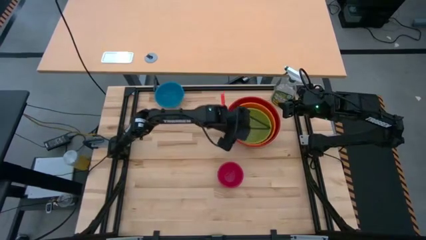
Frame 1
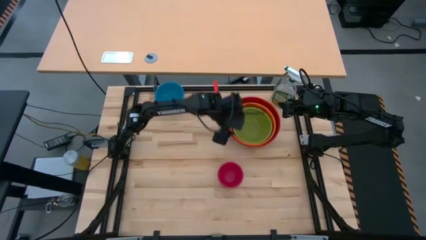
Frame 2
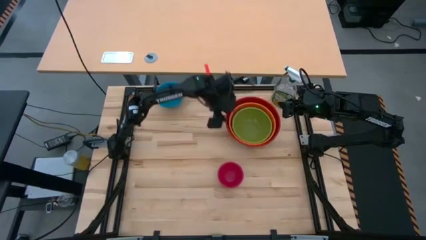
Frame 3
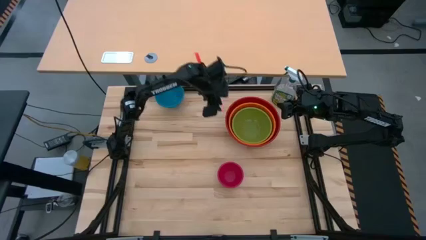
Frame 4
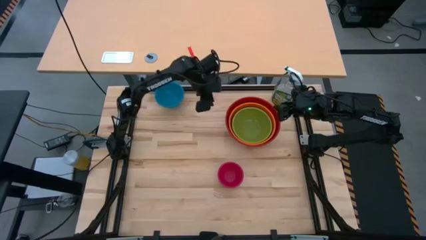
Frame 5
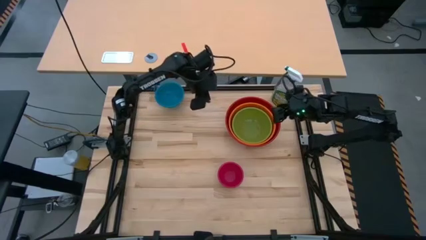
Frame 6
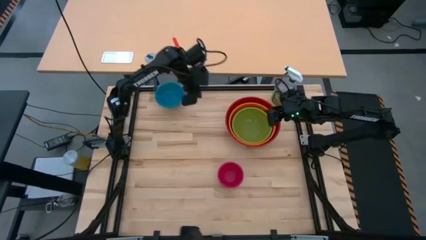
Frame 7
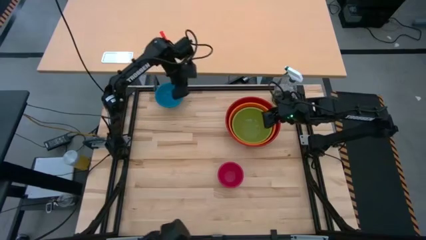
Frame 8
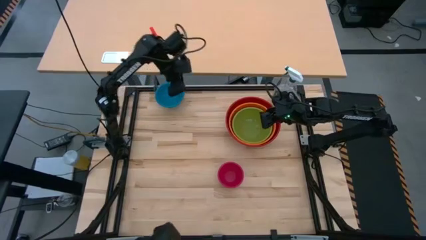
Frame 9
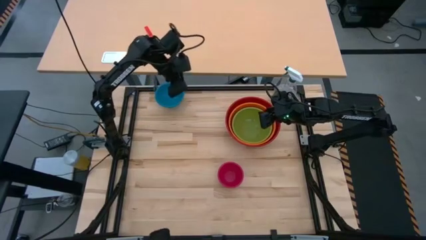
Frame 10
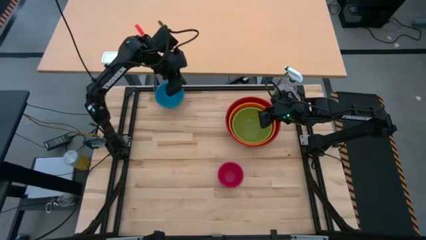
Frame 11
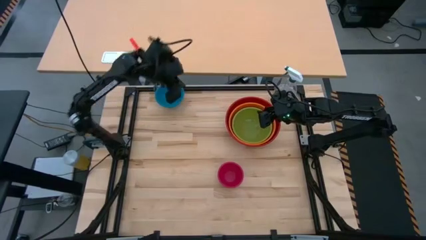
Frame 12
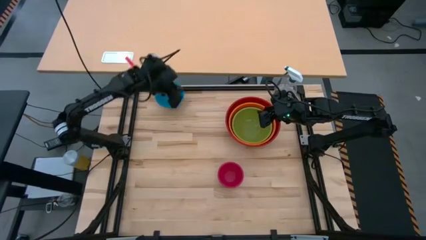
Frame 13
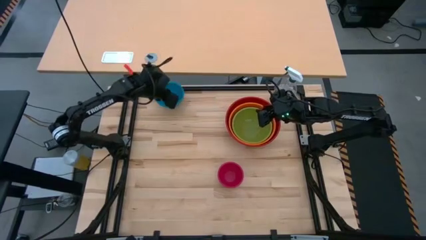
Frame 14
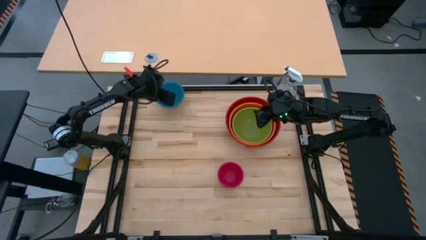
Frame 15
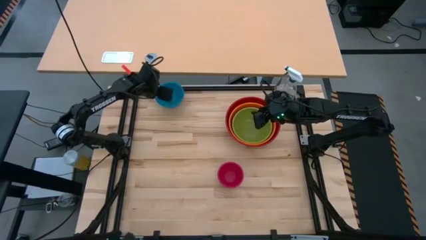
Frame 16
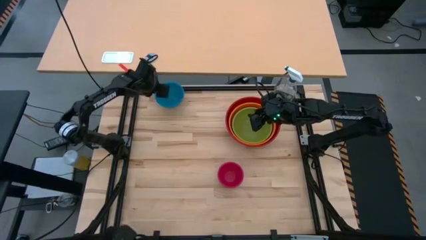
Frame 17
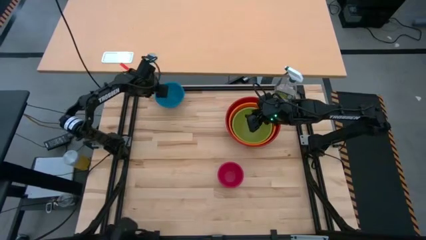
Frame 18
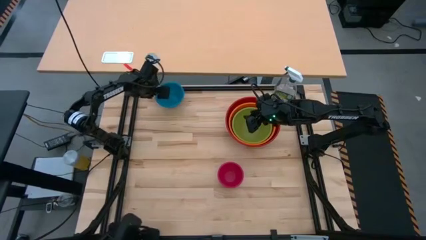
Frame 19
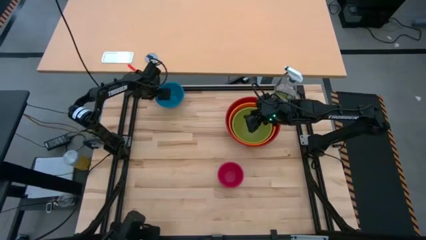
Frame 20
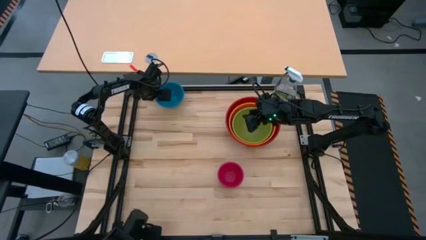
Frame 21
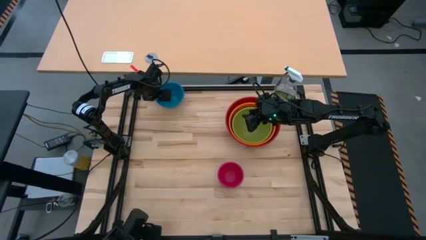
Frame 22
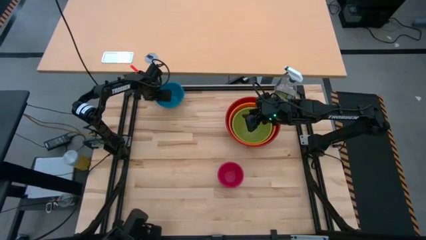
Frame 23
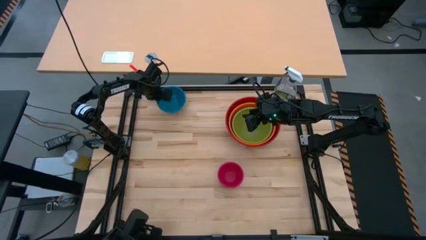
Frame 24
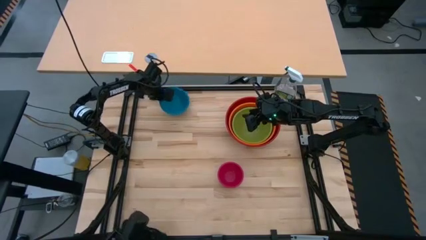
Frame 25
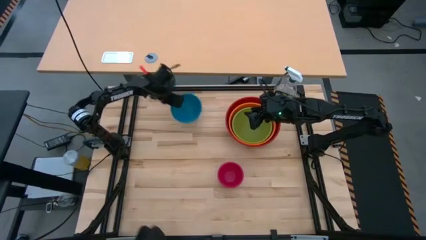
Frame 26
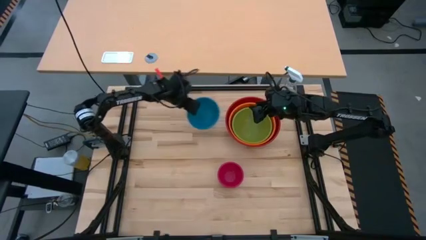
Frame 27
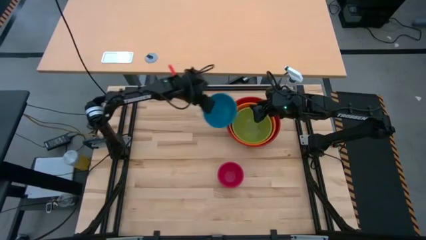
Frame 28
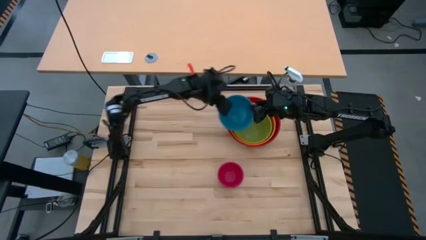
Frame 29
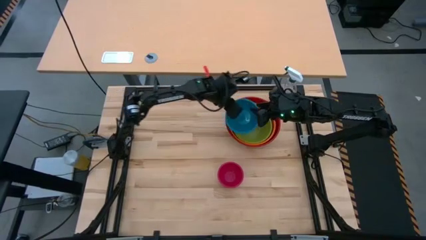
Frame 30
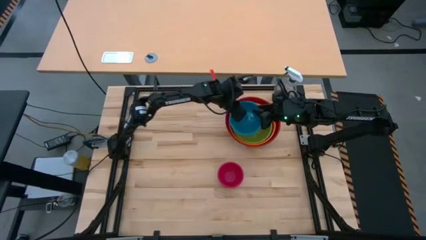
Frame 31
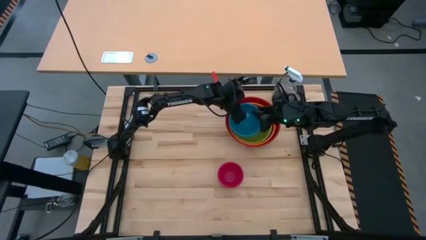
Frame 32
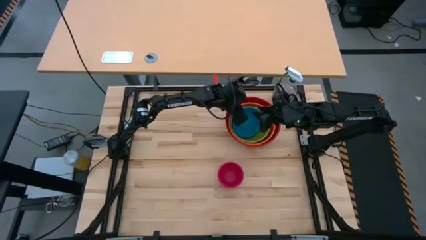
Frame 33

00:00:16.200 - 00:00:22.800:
Stack the blue bowl on top of the green bowl

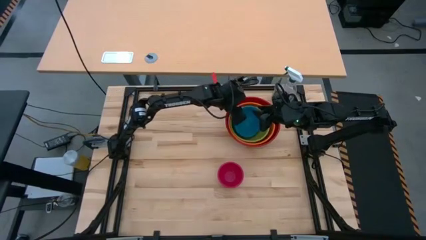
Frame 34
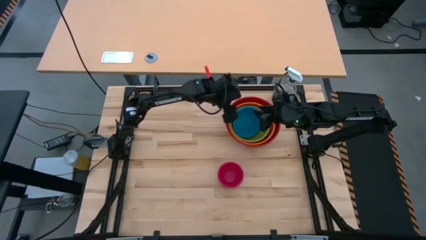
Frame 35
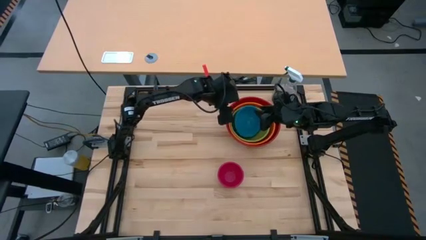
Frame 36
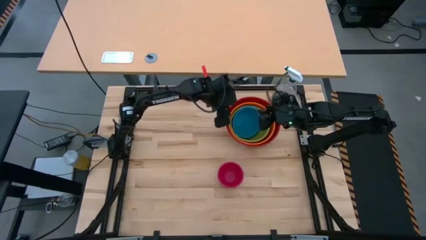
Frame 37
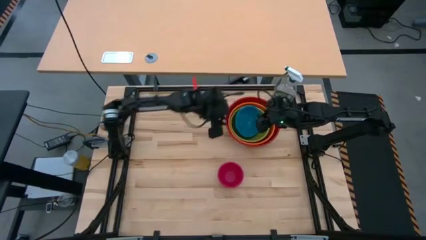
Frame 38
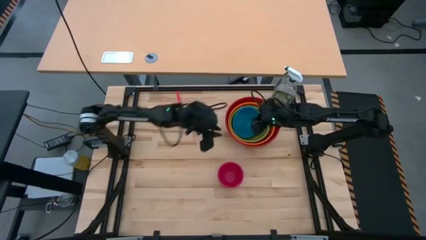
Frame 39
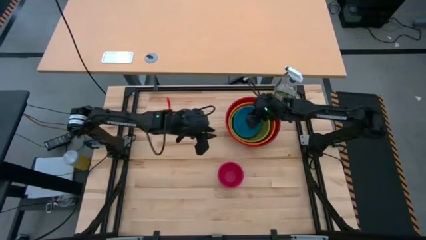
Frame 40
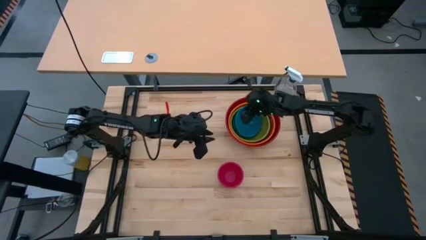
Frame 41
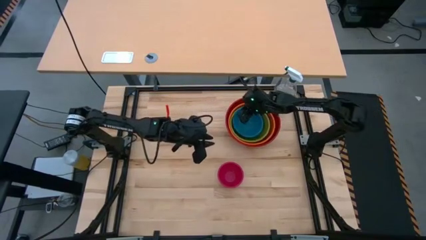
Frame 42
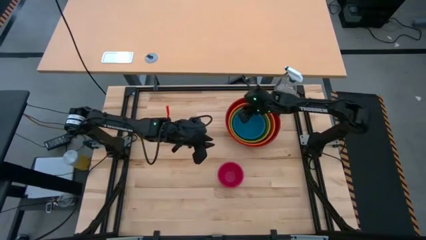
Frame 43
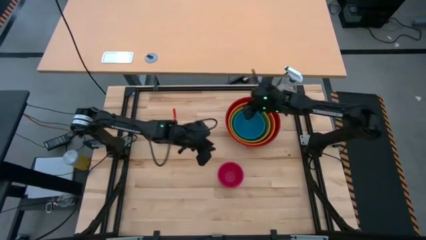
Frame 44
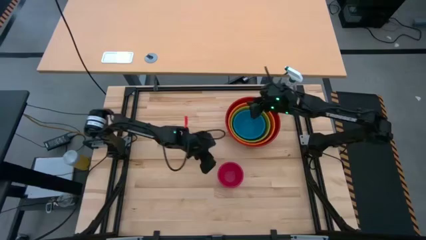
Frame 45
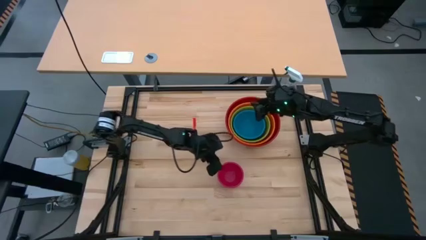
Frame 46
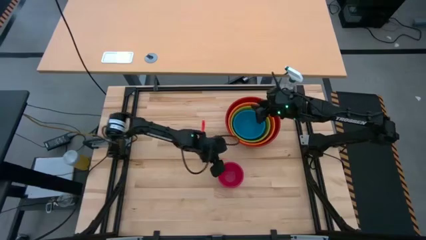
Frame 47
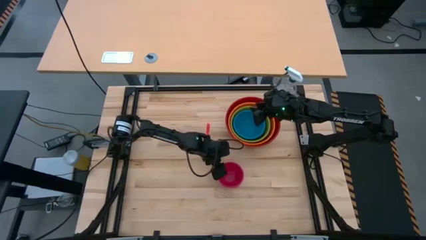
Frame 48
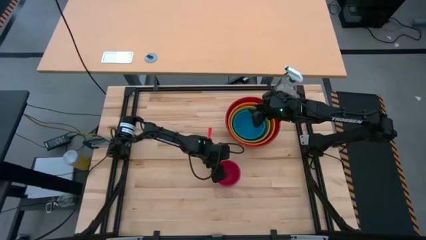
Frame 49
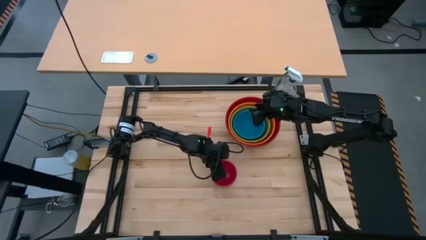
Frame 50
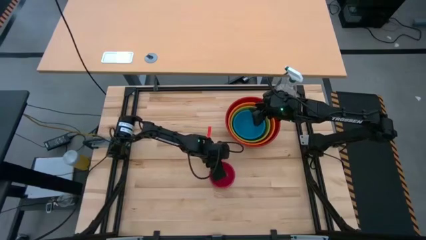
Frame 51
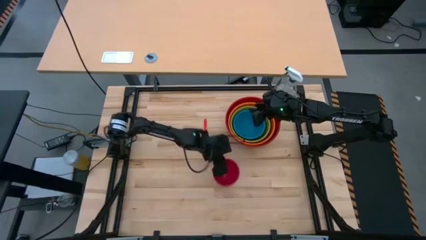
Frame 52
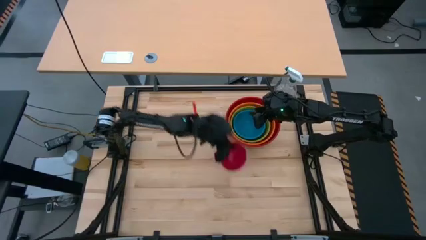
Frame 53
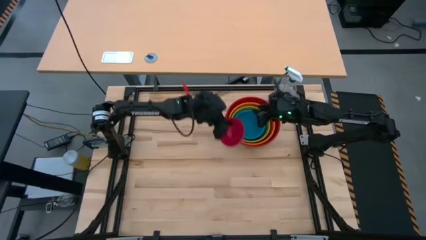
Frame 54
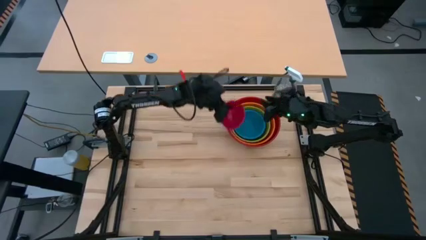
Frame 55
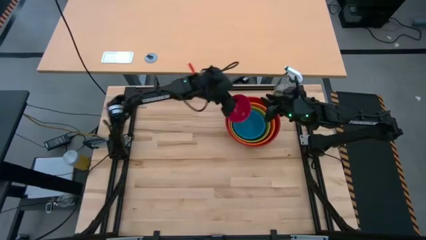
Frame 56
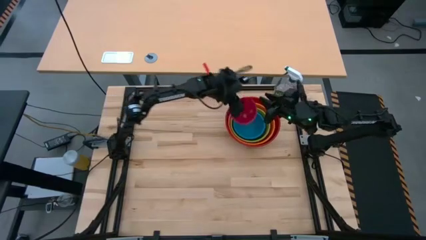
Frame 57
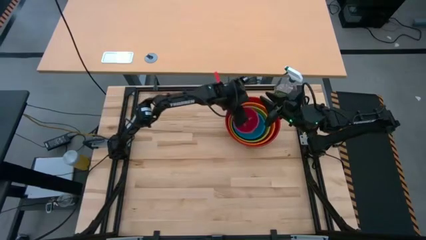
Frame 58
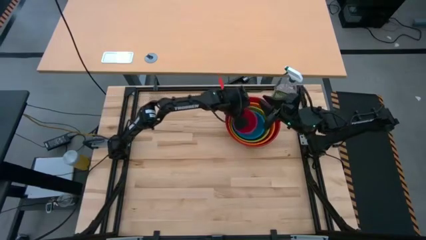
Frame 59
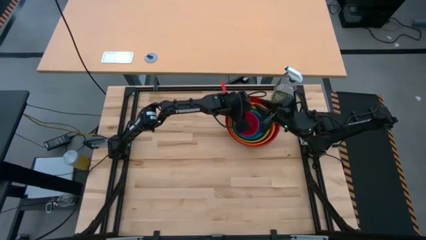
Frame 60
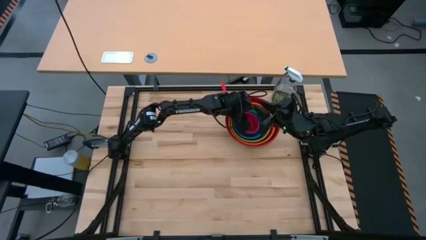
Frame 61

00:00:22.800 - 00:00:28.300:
Stack the pink bowl on top of the blue bowl

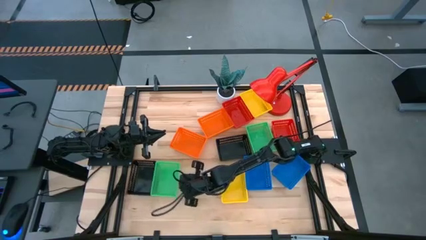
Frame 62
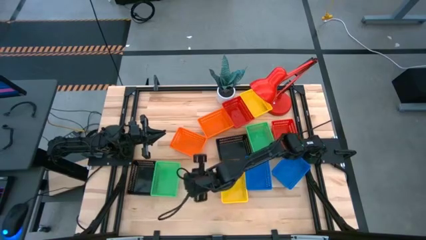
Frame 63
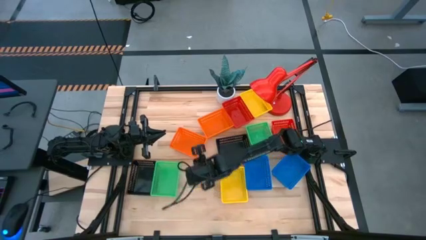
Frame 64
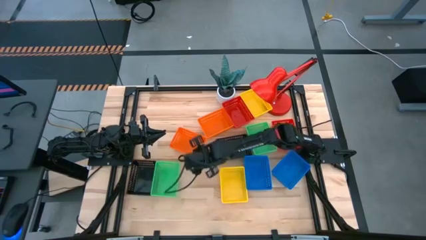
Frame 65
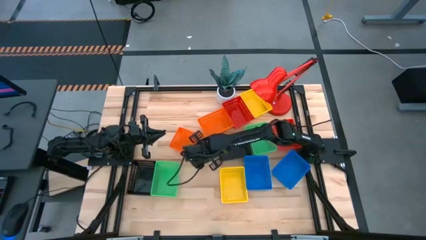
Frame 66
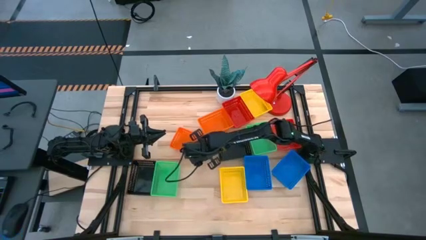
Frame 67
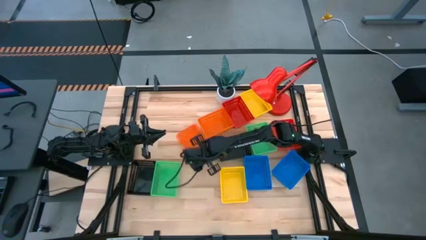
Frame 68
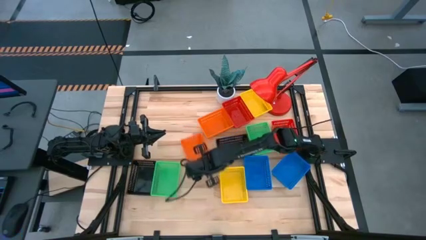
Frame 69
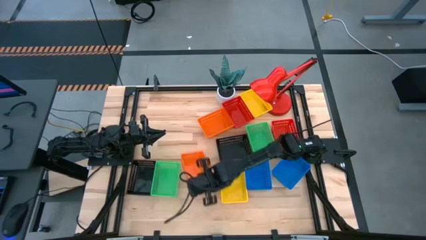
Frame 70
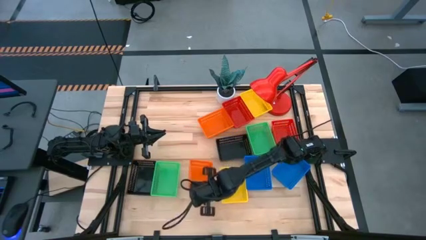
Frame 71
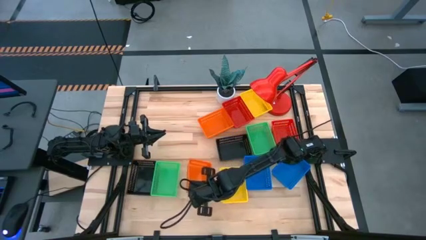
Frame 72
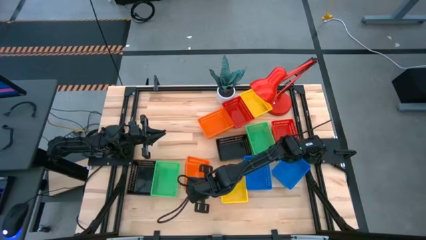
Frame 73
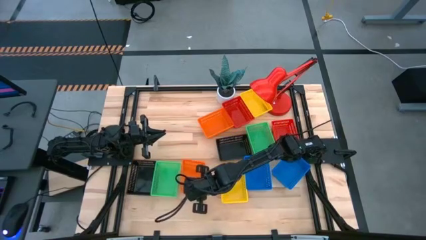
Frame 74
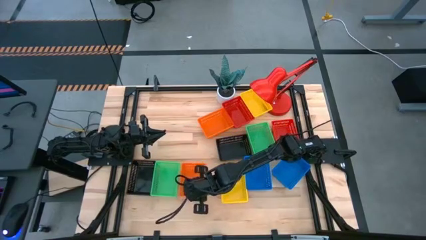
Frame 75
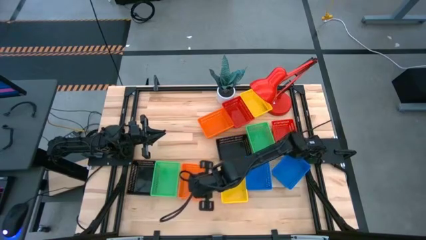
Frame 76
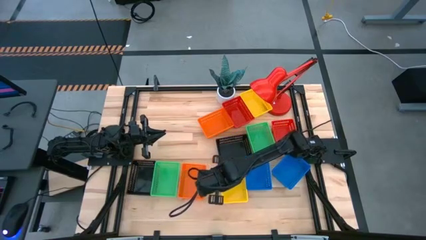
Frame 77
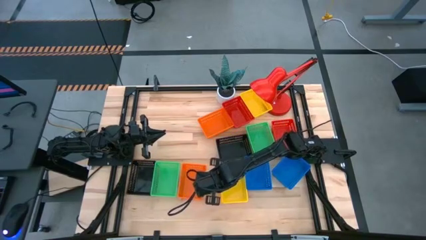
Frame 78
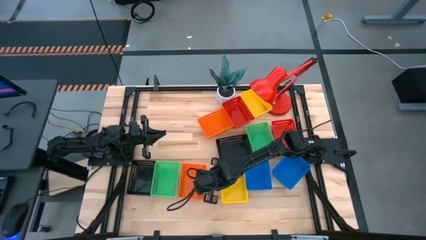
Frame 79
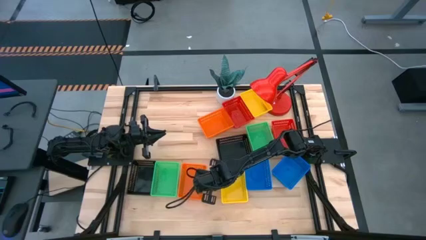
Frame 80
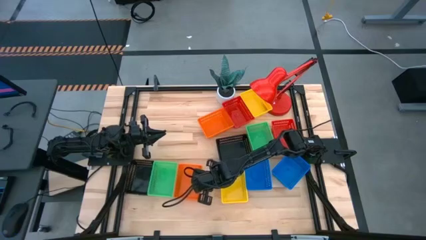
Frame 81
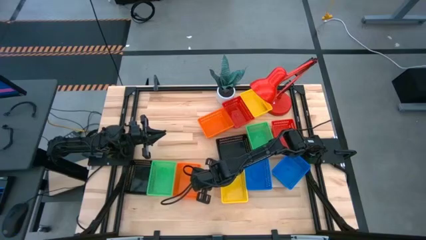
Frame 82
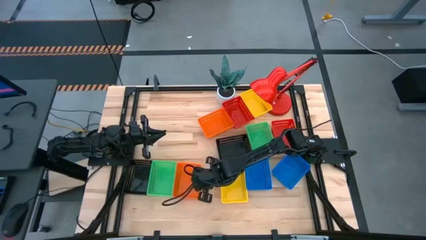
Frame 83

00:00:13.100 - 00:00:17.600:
Move the left orange bin to the bottom left of the table
